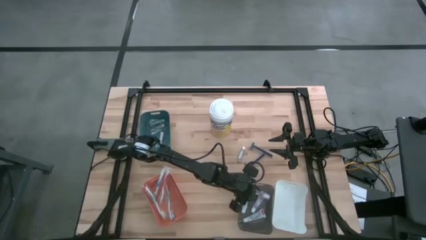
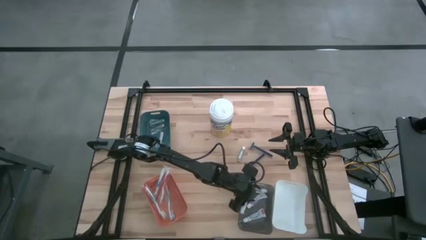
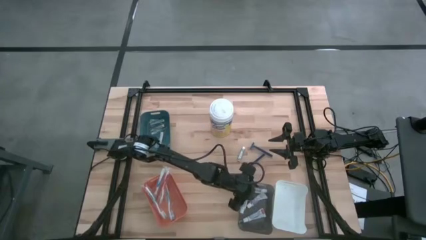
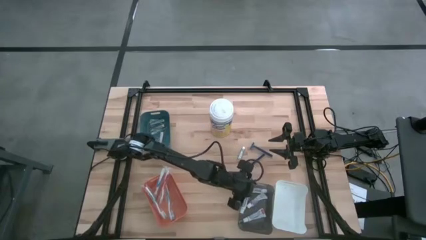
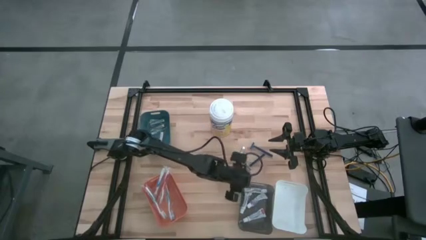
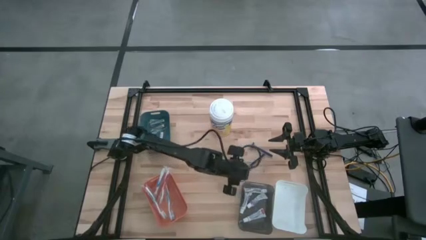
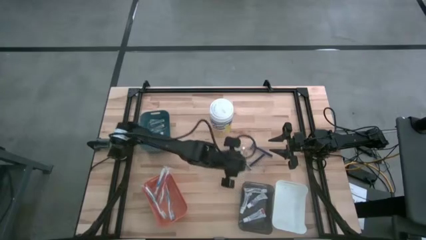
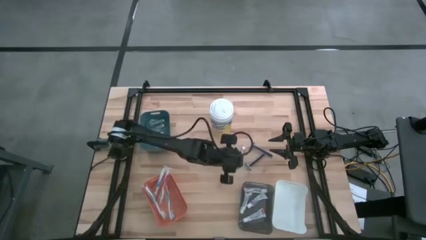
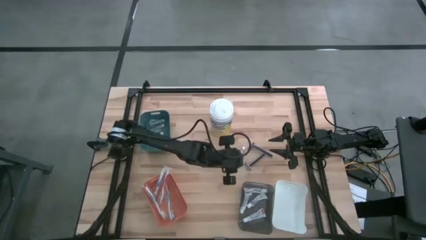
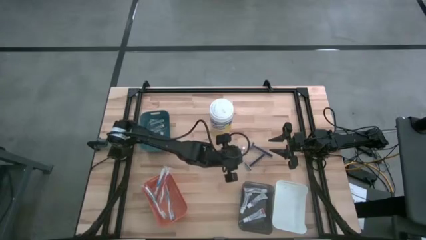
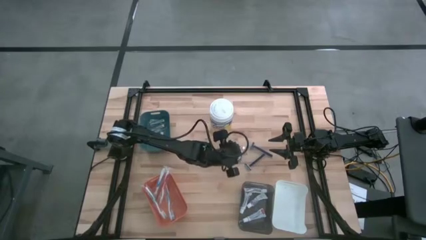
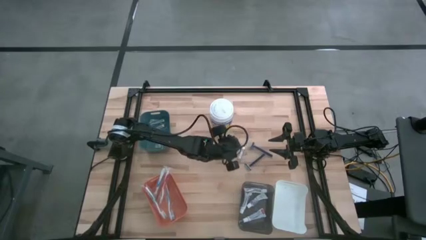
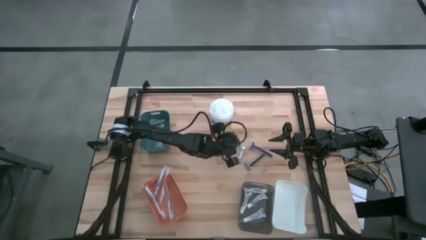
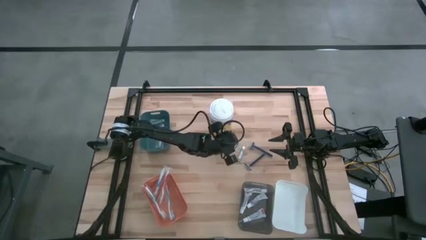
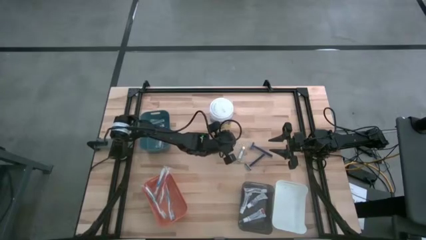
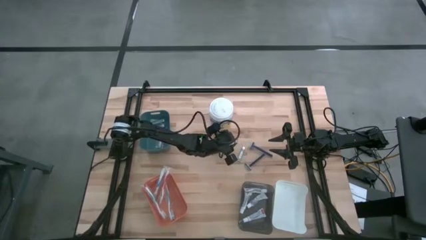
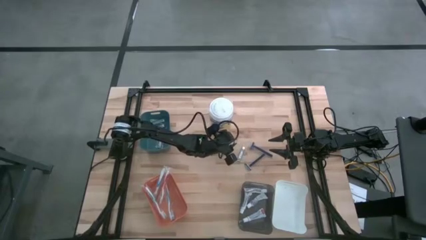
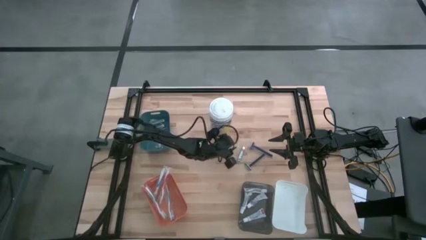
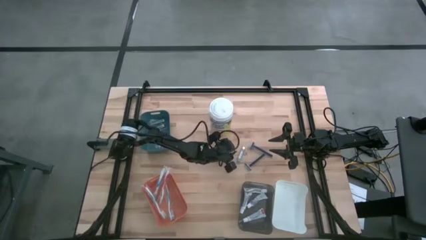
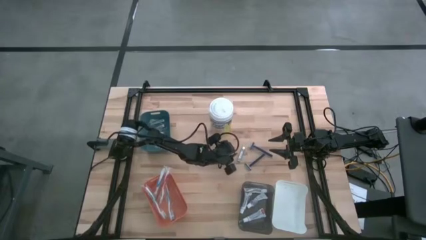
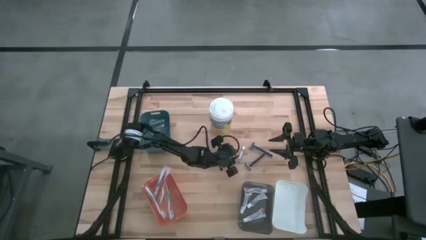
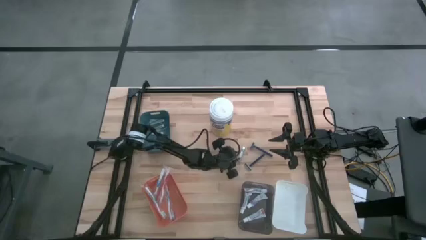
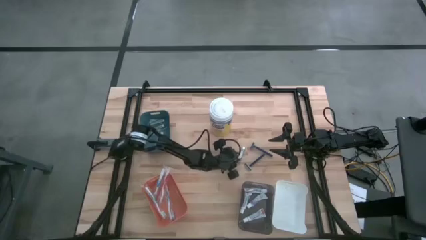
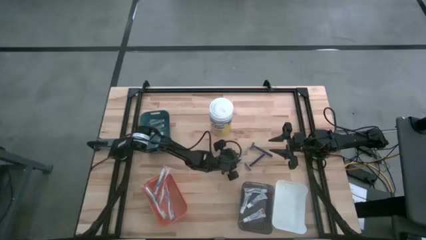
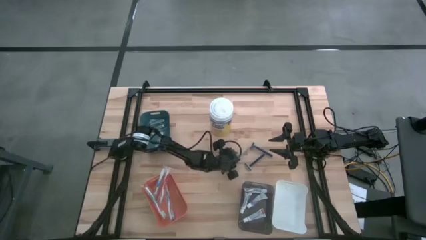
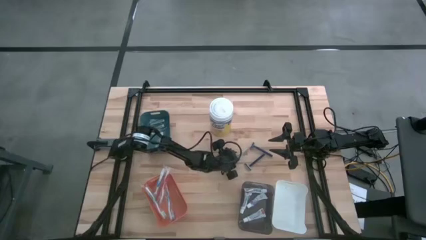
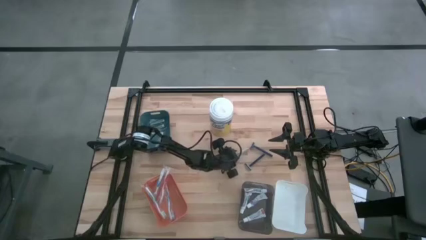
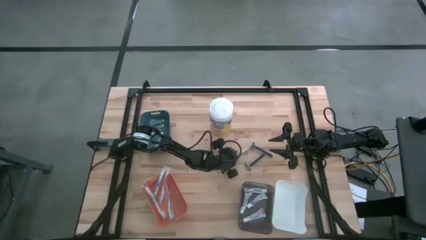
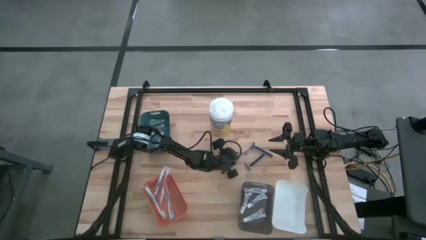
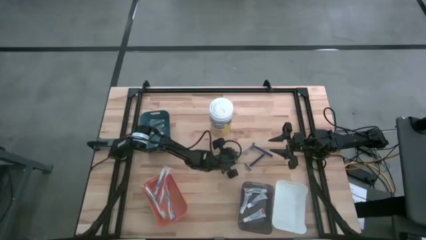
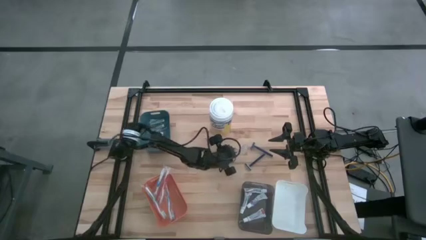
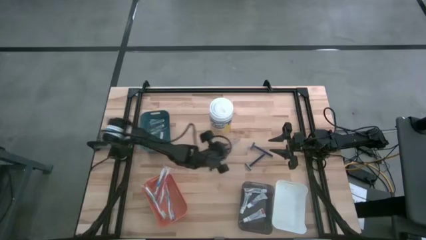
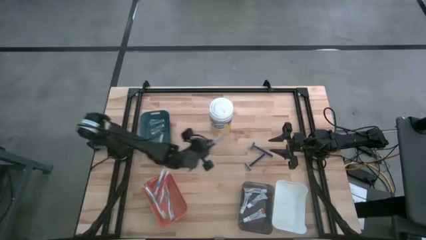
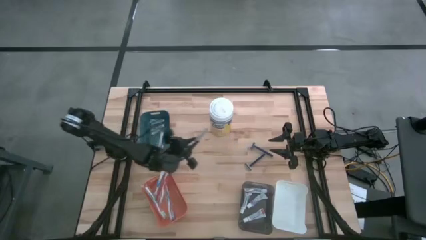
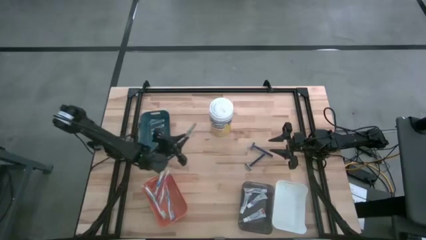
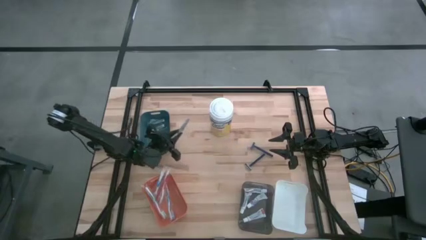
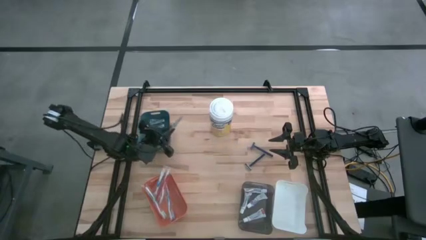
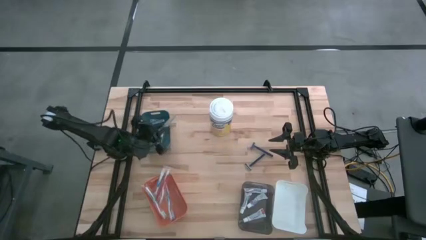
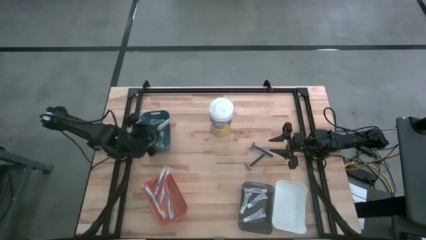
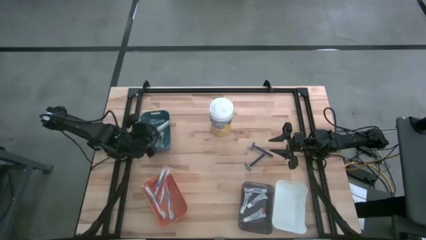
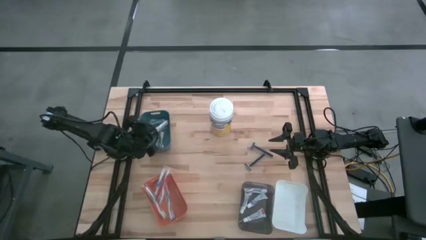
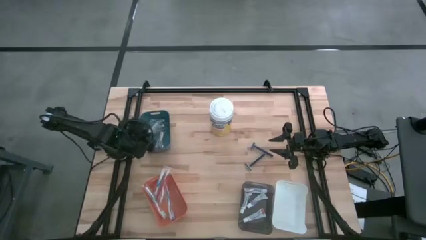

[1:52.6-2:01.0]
Task: Pick & Place Travel size toiletries
Put the silver nail cutter into the blue bin

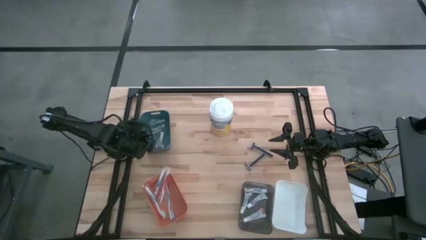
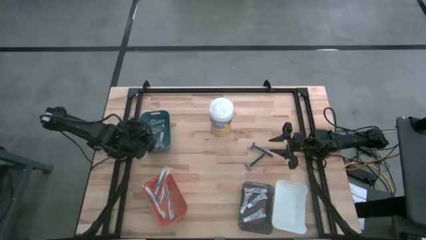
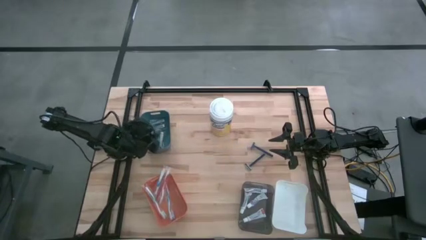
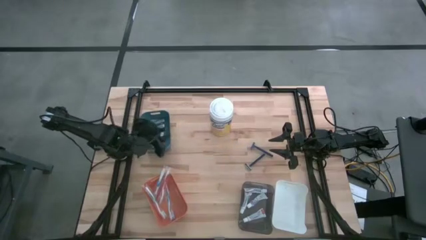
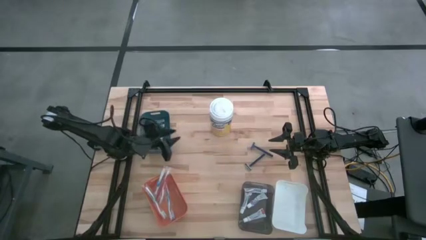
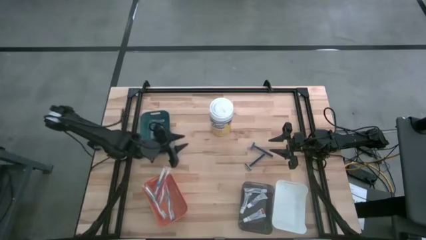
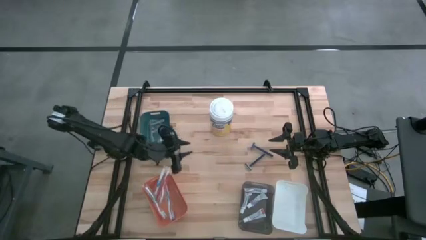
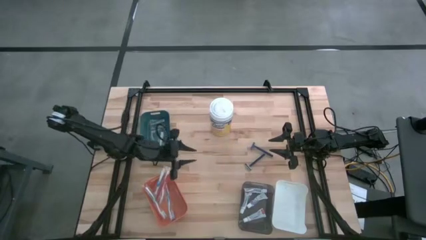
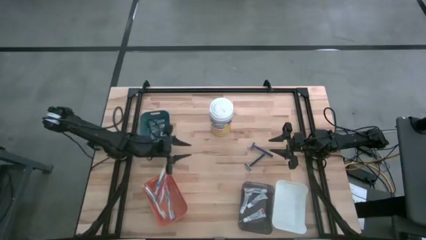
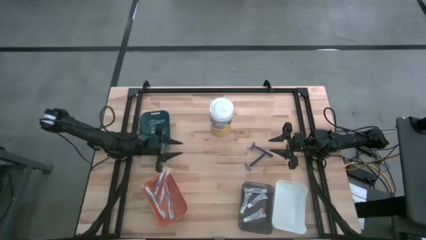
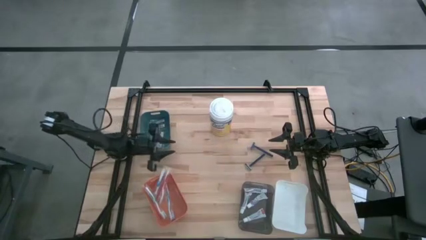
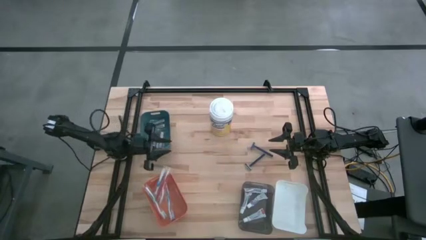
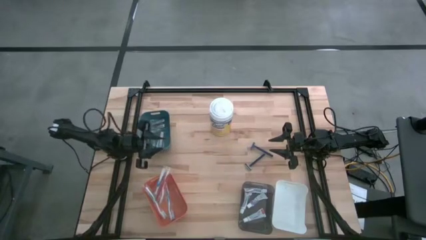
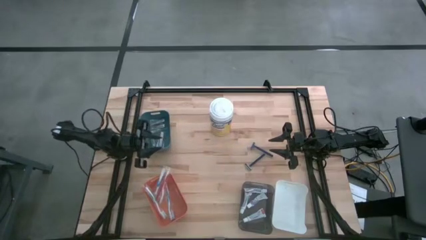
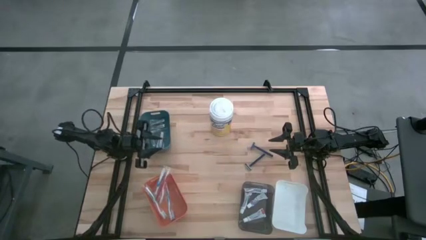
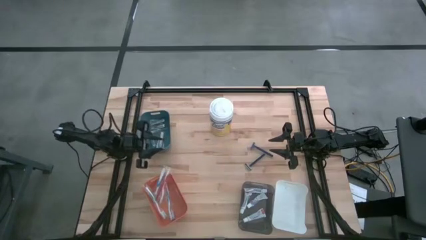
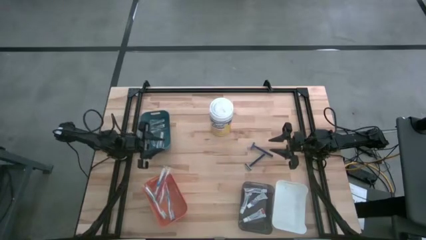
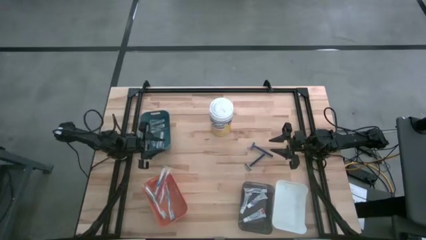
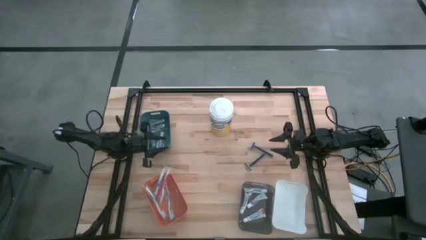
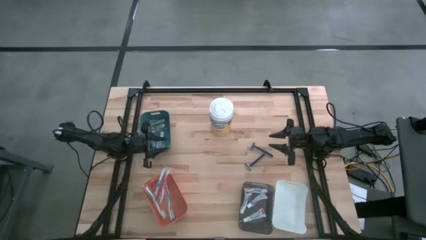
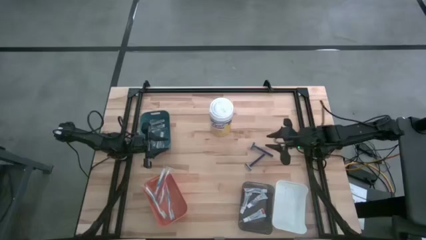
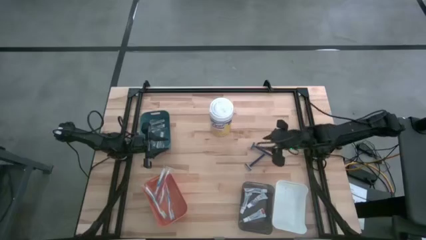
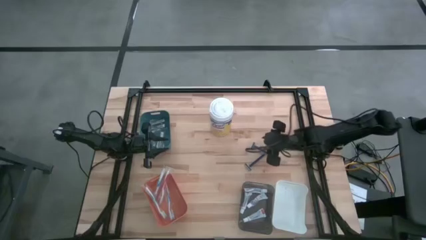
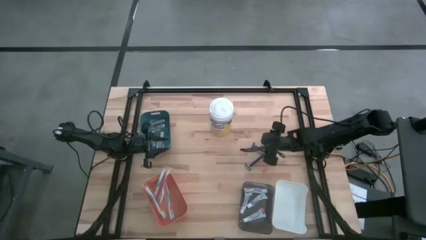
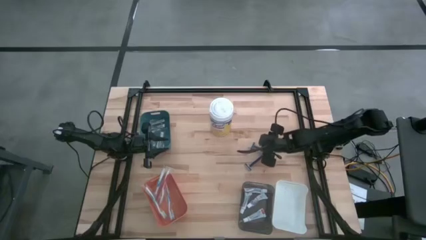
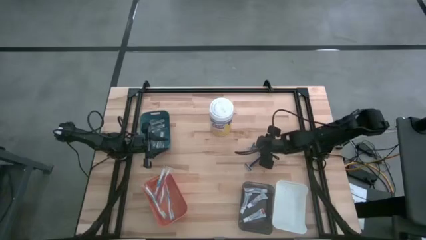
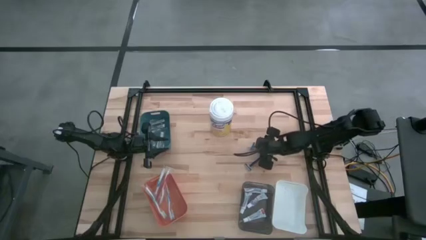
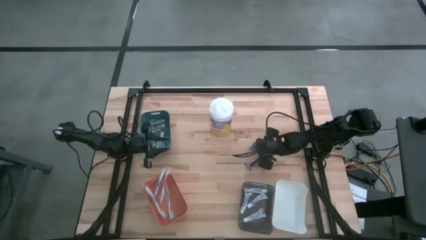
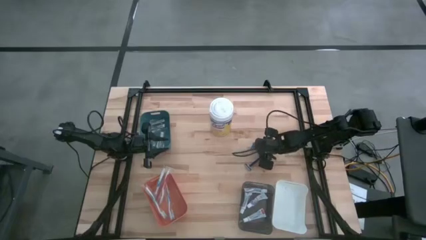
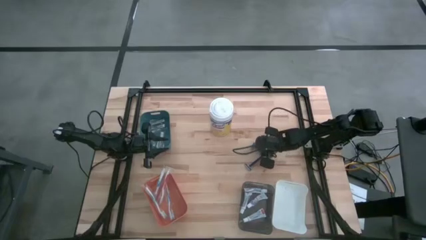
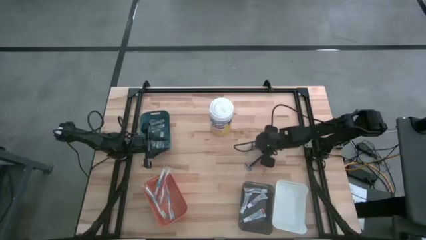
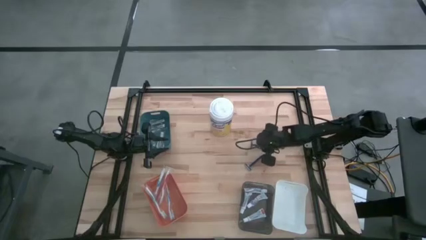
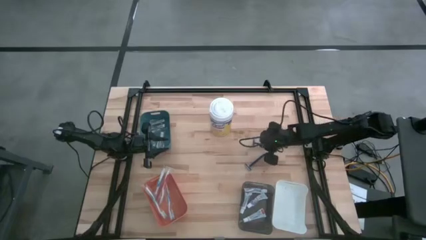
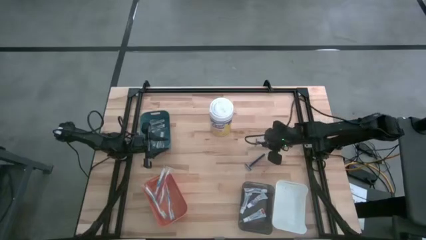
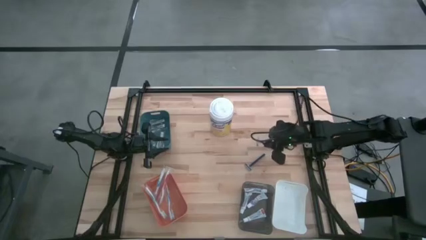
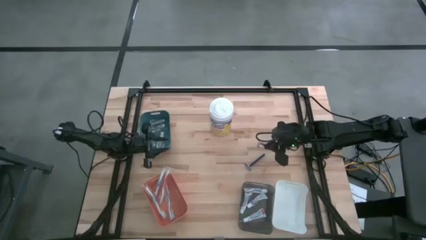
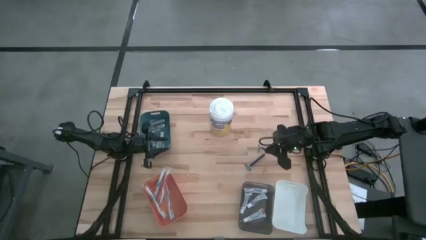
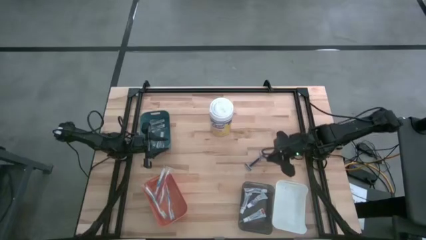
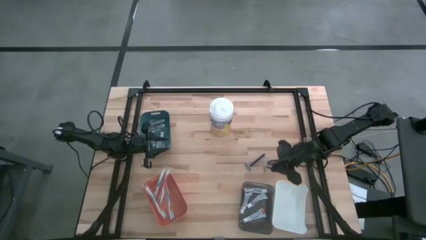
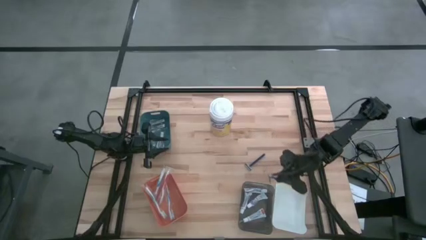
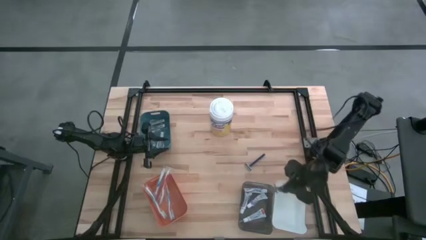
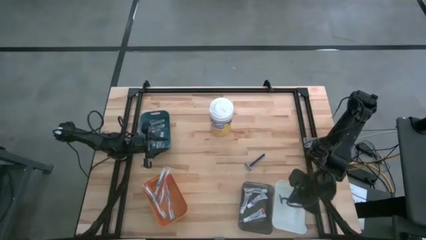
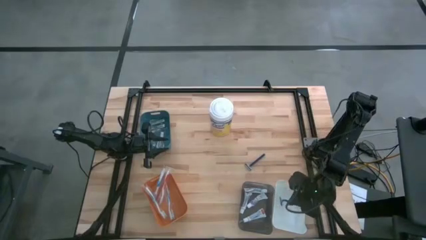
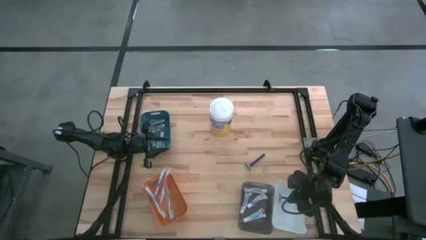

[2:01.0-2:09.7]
Put the blue razor into the white bin
